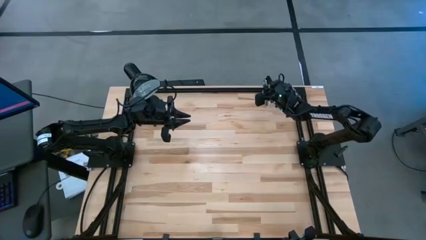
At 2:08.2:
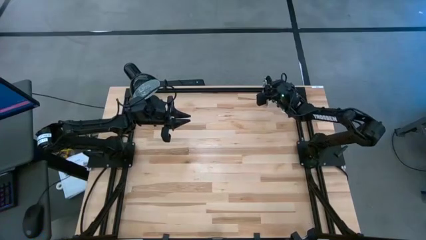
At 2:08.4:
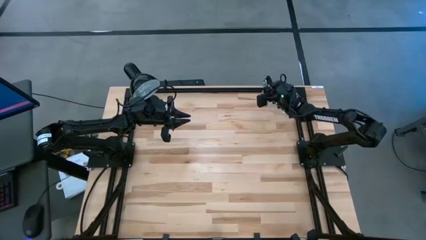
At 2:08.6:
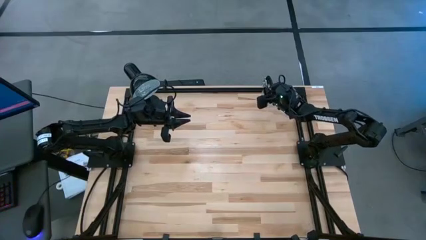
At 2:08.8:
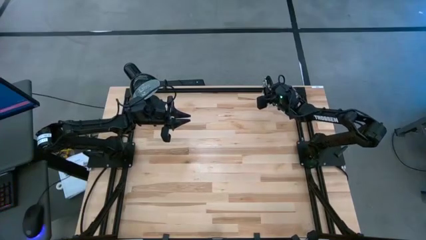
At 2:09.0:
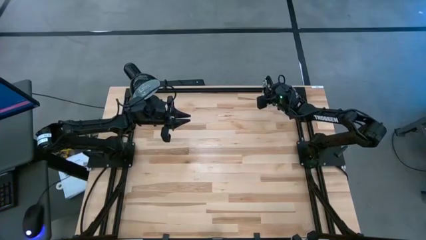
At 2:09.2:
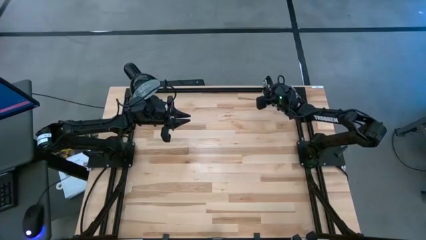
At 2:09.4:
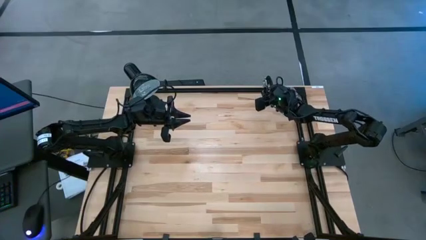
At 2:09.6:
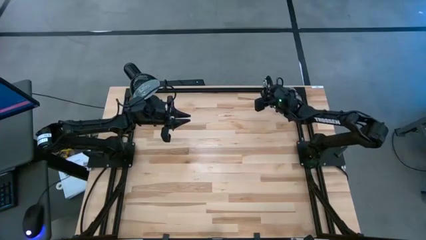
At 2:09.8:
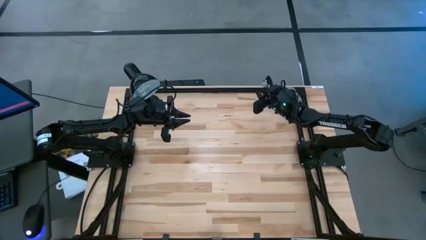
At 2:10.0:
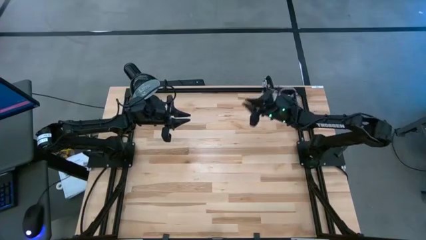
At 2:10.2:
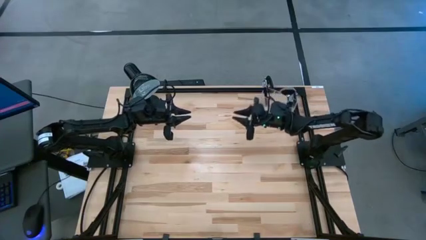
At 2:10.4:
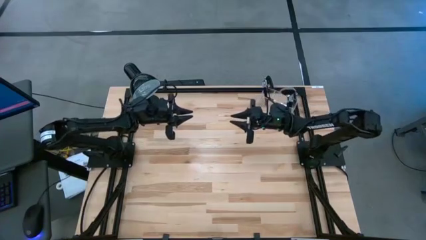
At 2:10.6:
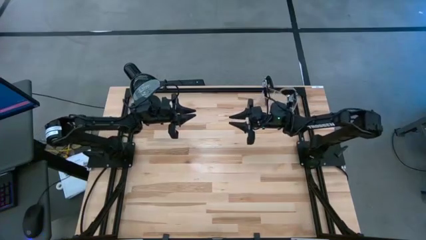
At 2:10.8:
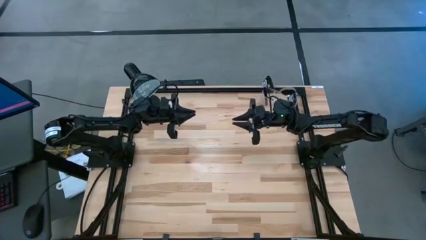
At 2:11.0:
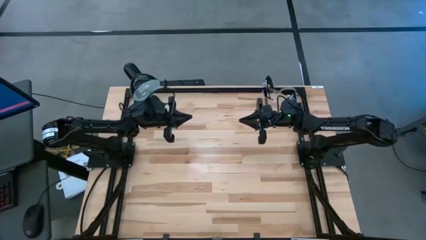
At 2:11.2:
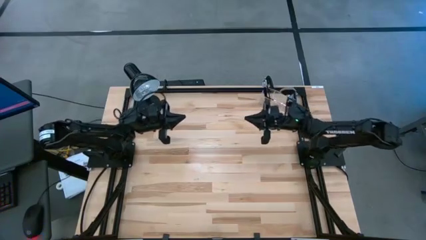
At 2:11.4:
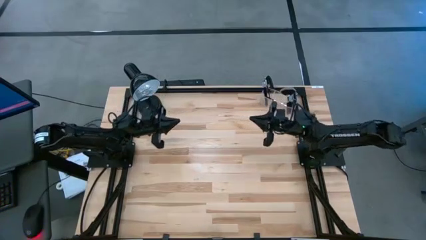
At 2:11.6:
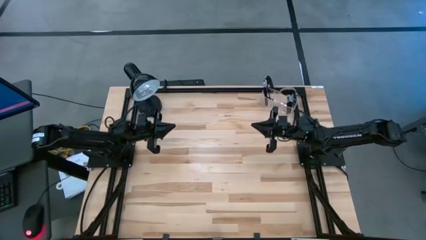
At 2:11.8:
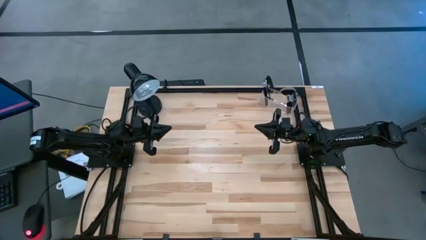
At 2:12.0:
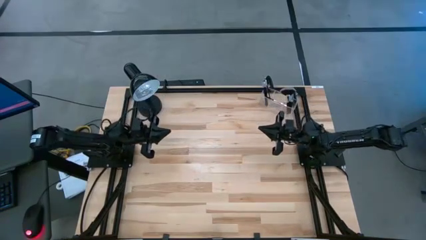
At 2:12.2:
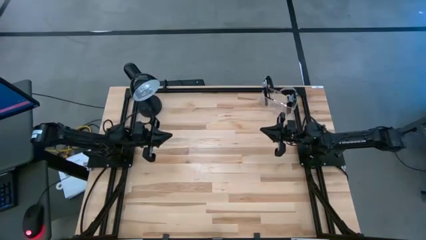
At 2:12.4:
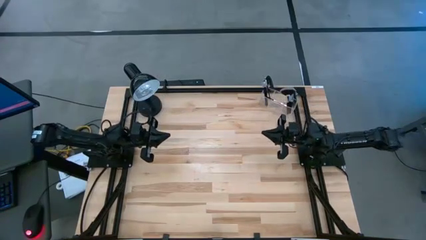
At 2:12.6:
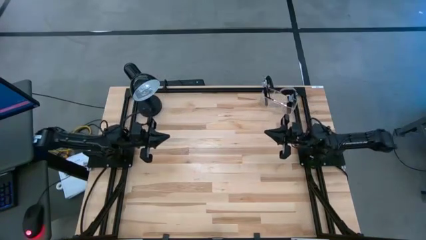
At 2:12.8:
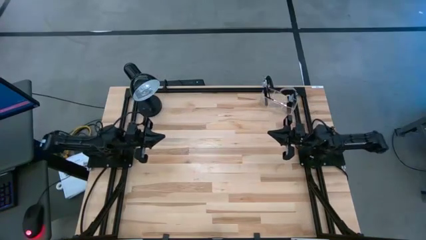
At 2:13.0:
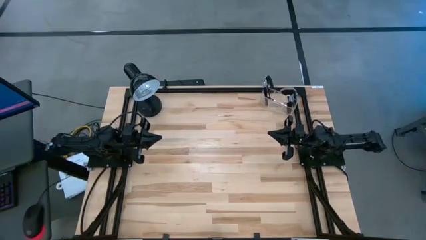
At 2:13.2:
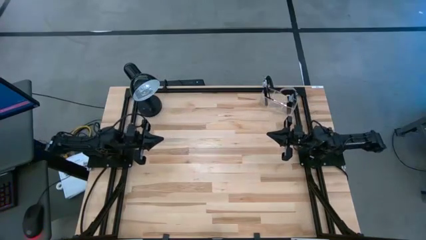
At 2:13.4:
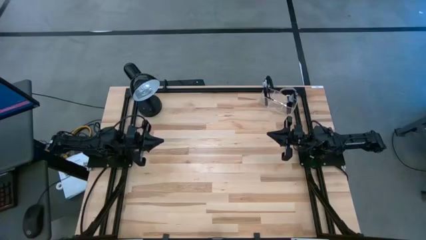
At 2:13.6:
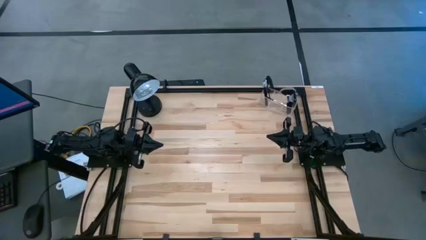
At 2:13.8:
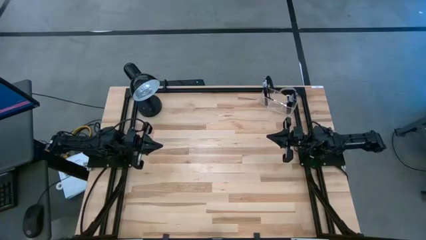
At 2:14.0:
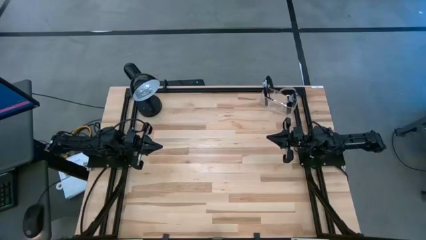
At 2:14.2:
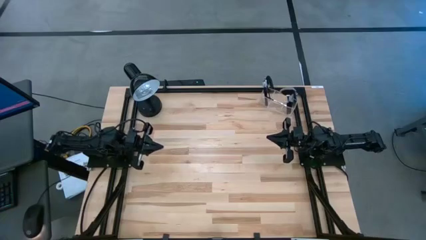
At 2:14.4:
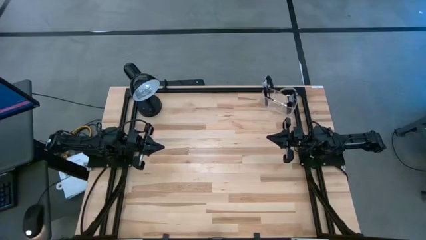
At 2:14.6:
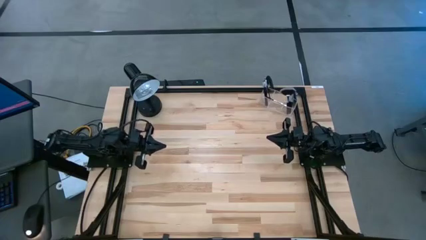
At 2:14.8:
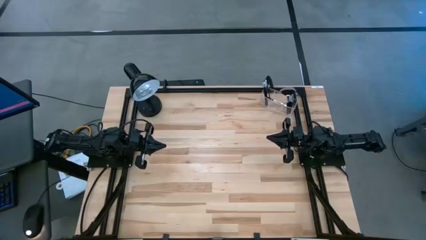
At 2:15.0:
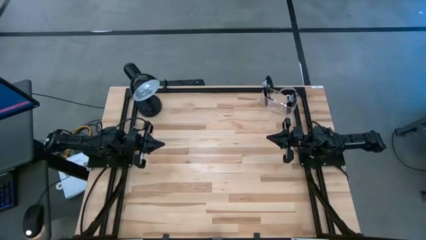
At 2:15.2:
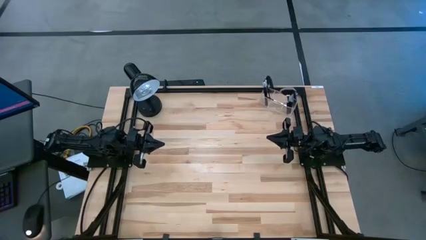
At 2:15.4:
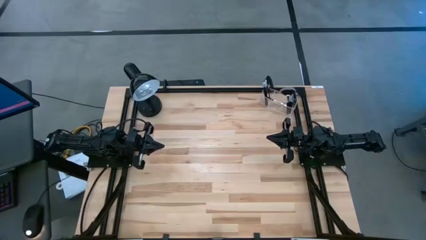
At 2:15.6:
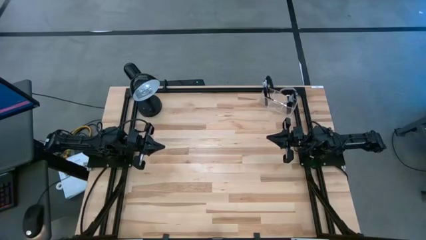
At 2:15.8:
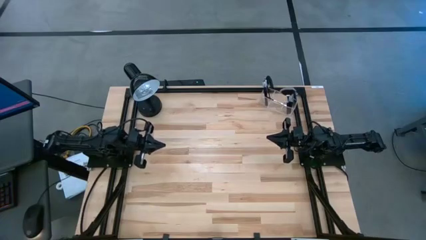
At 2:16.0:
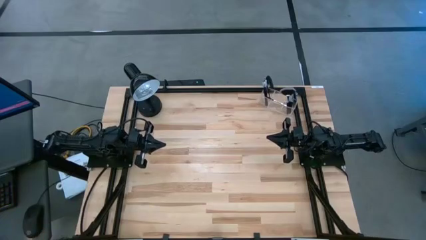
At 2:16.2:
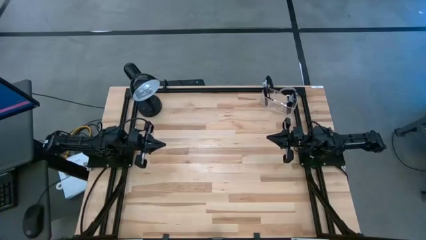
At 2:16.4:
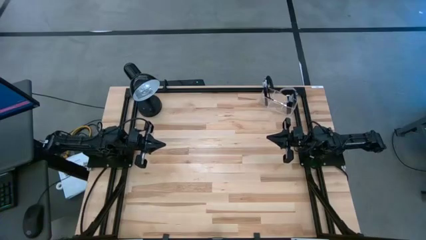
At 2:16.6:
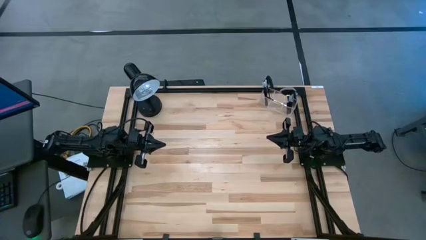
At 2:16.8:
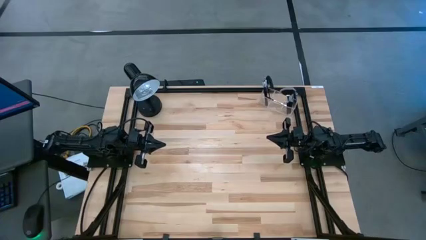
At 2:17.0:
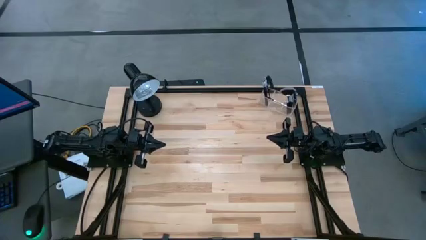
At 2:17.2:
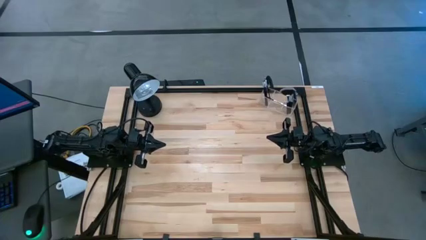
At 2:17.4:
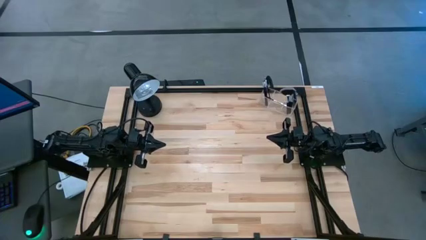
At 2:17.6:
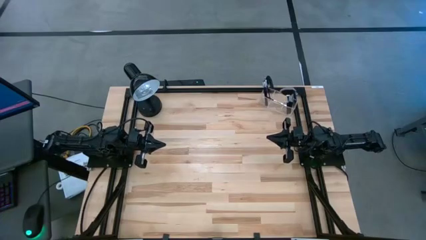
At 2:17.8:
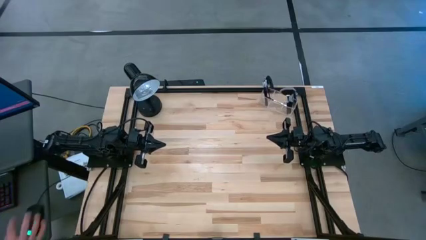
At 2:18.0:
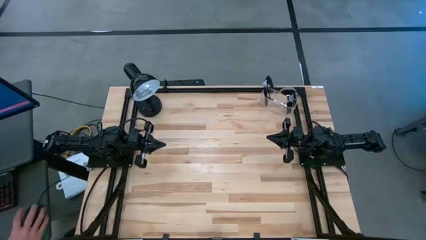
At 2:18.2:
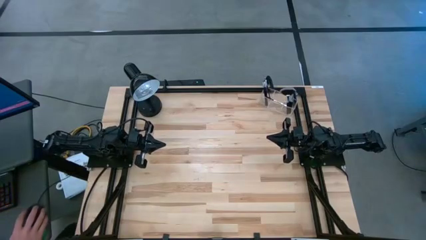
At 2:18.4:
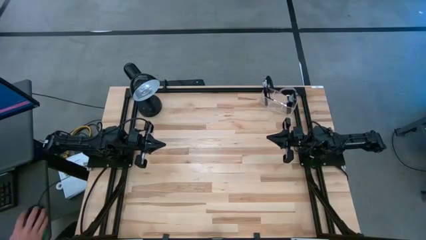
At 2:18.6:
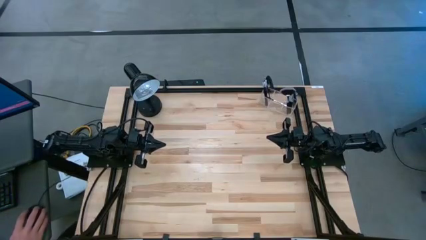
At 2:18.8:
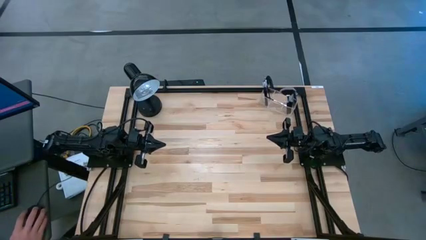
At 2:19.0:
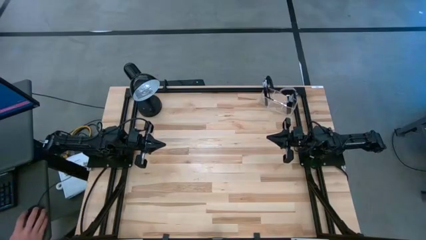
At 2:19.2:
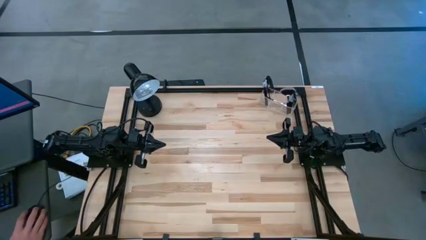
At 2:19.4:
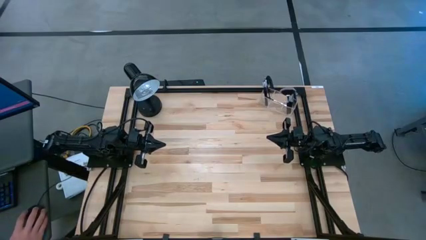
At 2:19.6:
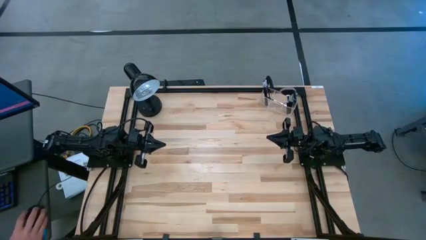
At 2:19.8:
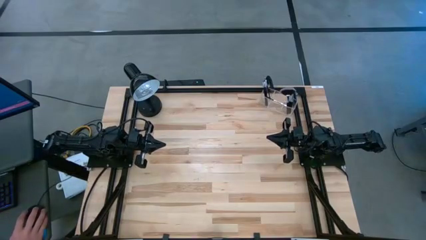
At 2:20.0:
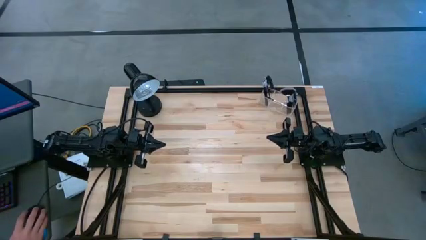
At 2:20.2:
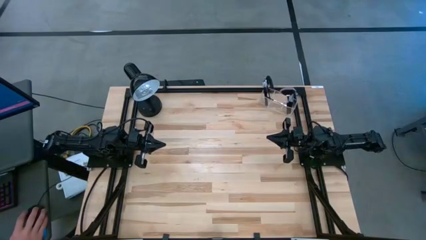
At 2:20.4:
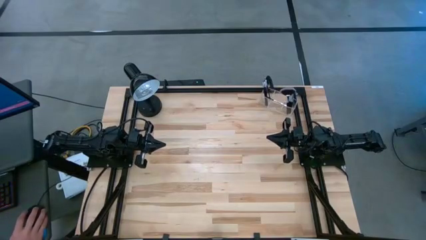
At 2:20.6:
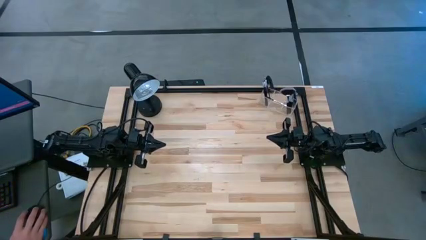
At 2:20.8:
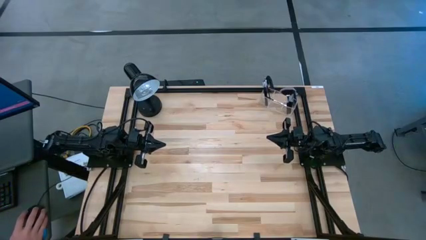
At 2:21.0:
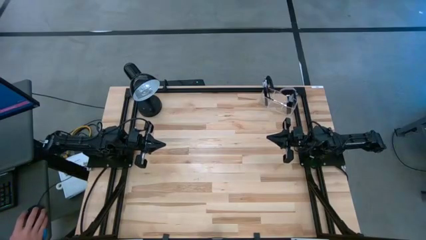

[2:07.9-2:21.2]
Task: Sort items
Return to Home Position

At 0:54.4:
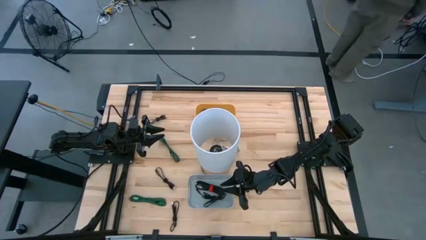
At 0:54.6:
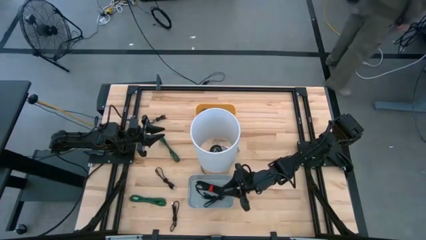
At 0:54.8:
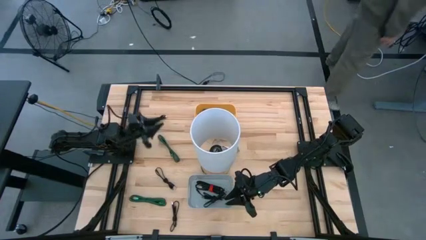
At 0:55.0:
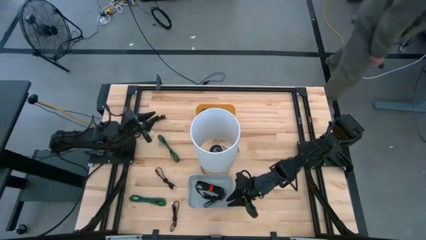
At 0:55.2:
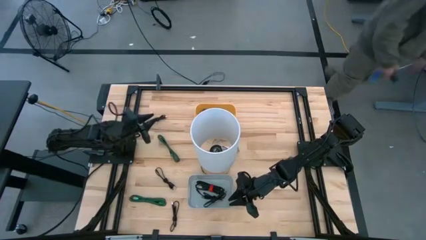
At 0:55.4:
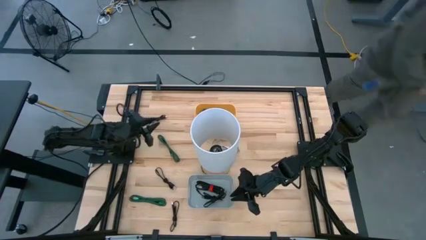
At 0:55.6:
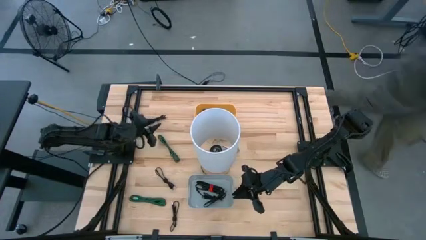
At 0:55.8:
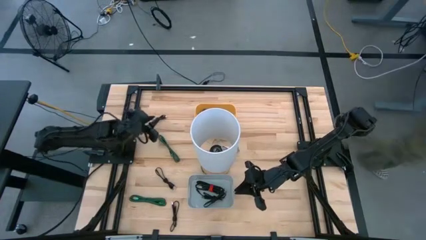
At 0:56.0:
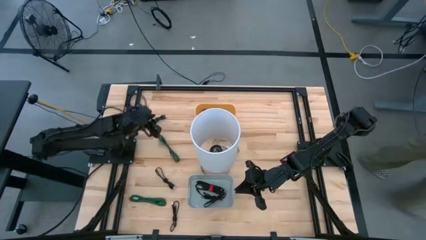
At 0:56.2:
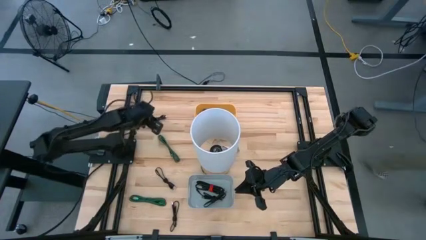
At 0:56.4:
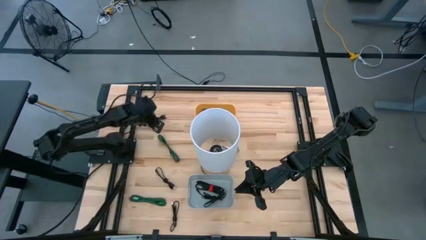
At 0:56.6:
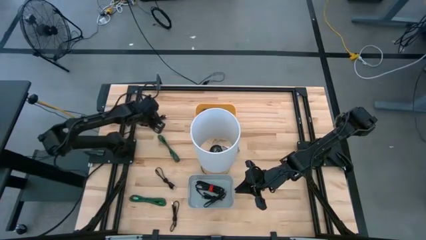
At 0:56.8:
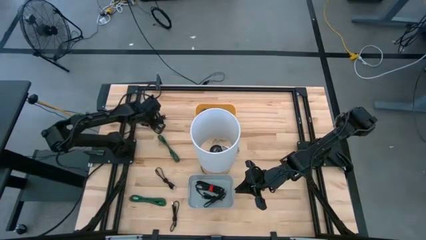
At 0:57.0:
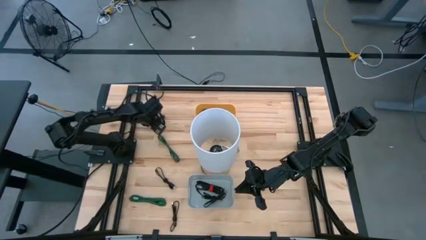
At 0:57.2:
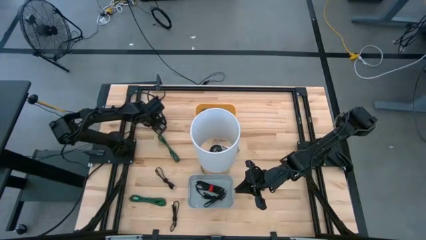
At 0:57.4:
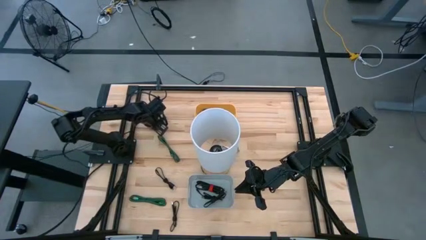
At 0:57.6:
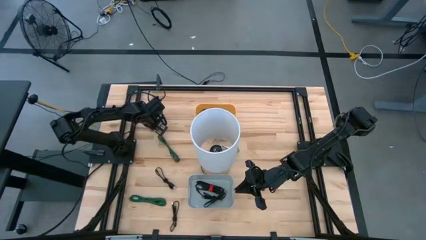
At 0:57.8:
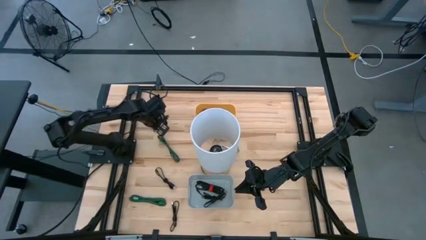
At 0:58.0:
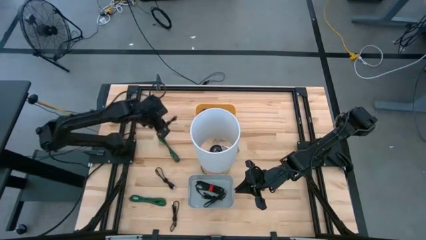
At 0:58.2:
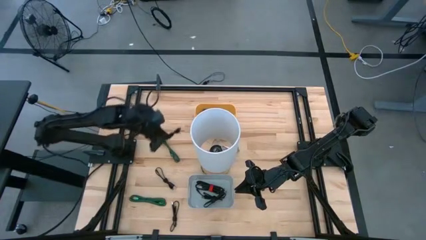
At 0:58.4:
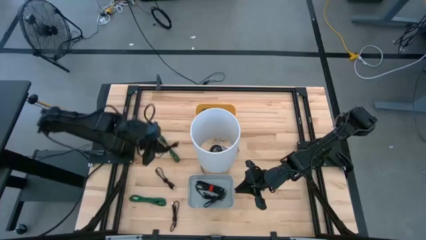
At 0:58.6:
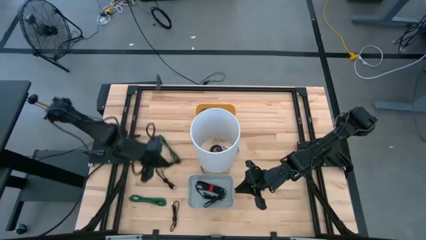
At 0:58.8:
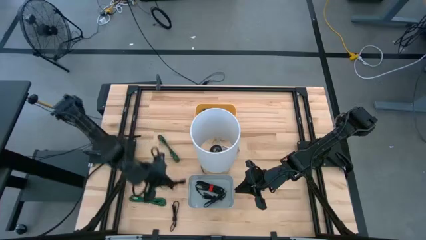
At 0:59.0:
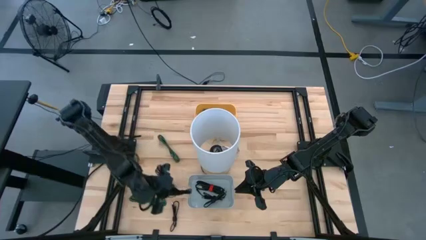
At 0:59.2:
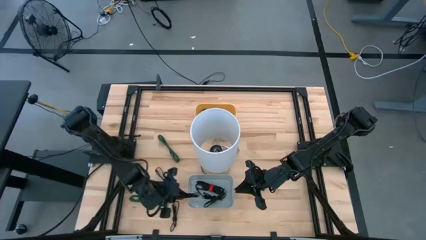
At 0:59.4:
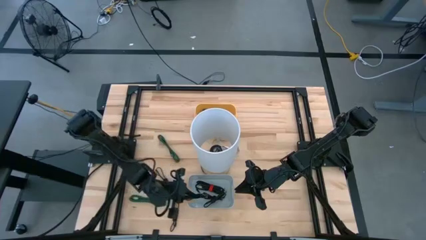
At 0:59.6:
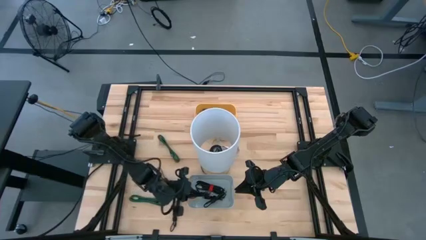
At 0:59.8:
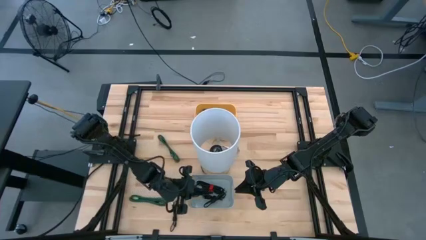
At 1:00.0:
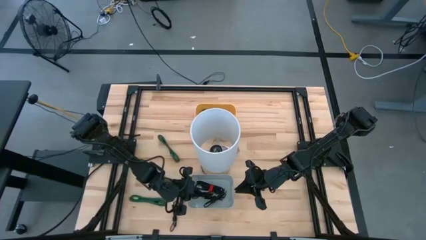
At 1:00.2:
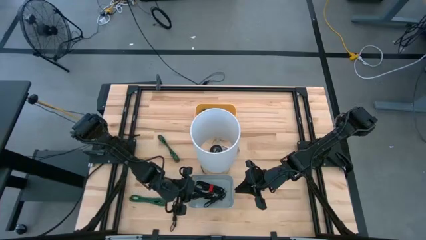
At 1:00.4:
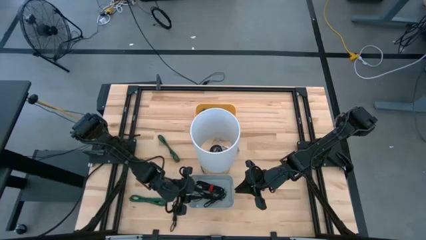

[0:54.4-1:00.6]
Task: Pick & Place USB Port
Put the black charger cable into the white bin
